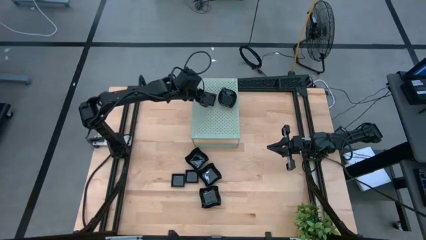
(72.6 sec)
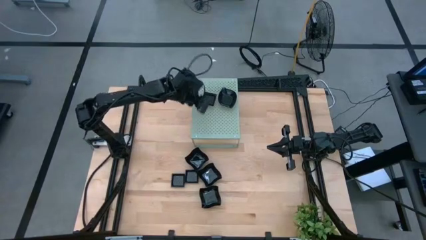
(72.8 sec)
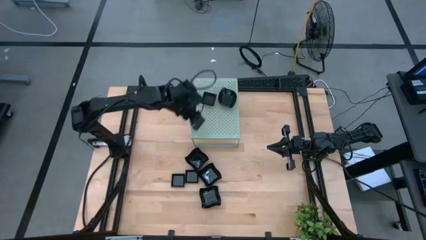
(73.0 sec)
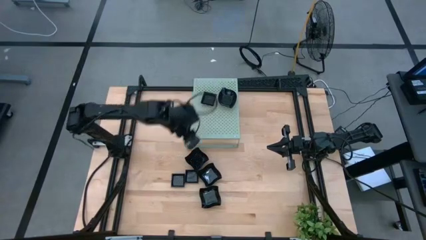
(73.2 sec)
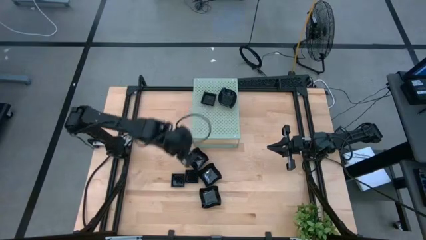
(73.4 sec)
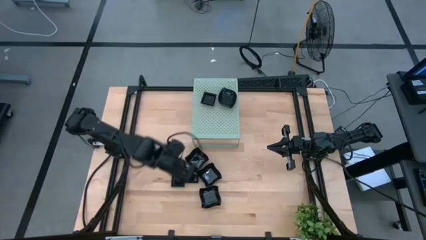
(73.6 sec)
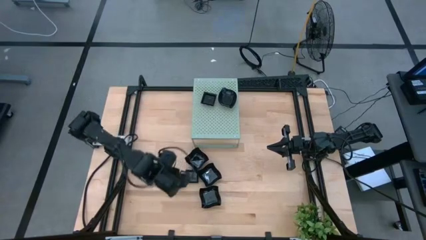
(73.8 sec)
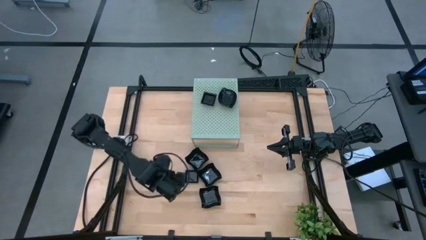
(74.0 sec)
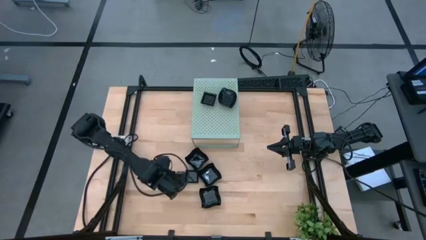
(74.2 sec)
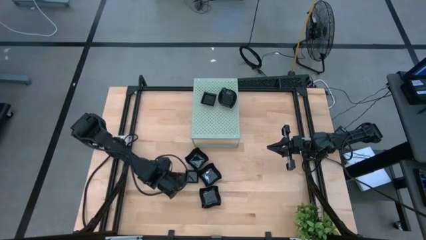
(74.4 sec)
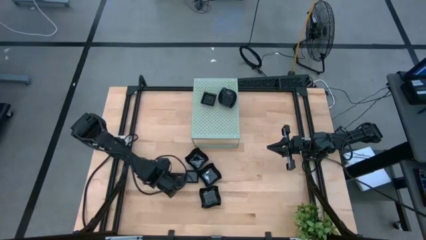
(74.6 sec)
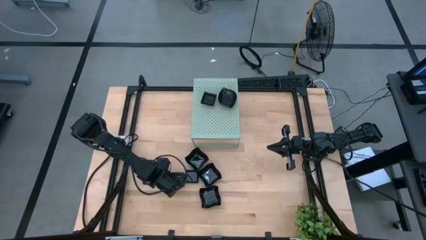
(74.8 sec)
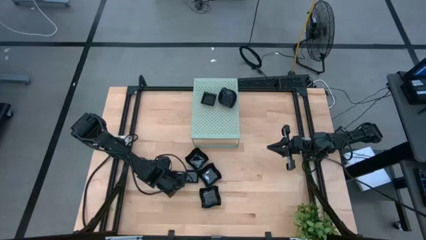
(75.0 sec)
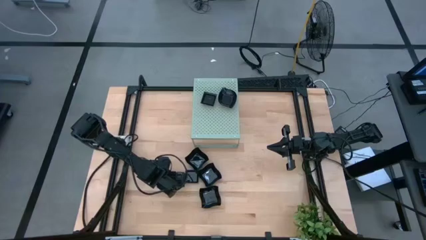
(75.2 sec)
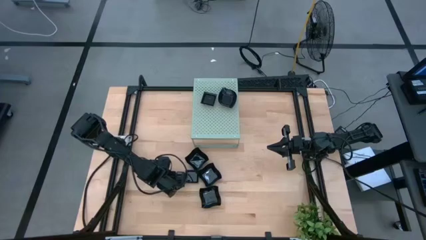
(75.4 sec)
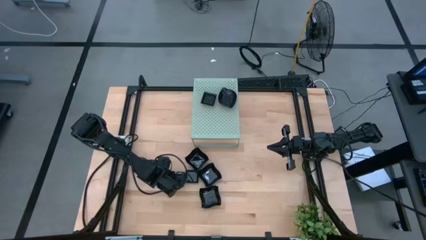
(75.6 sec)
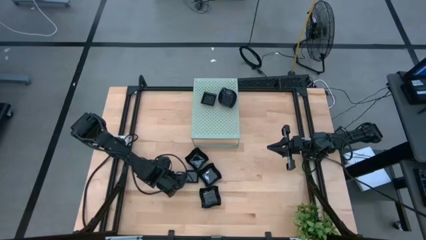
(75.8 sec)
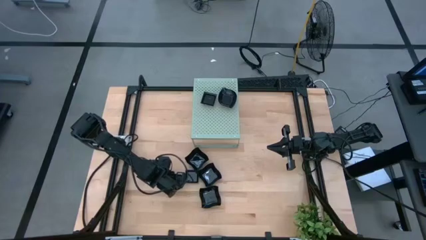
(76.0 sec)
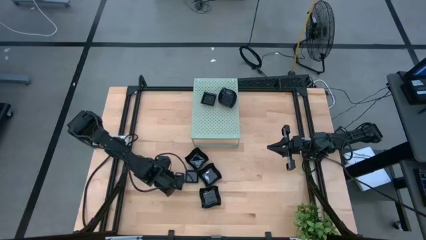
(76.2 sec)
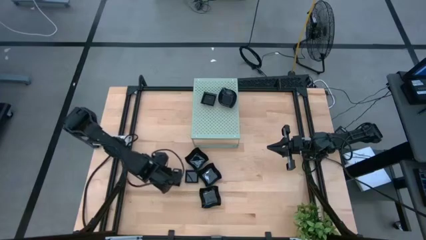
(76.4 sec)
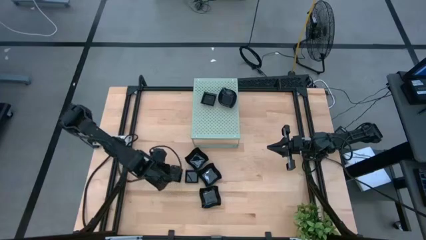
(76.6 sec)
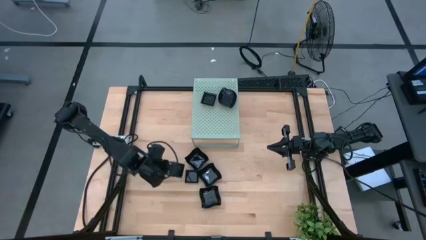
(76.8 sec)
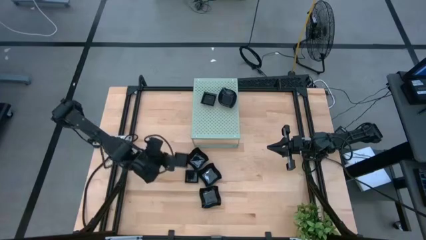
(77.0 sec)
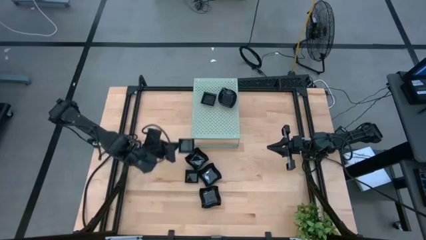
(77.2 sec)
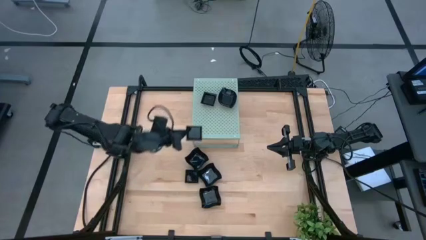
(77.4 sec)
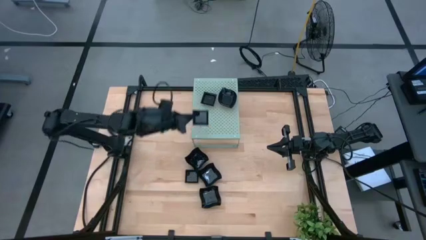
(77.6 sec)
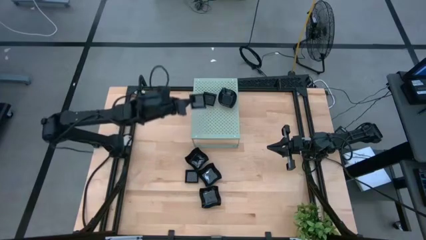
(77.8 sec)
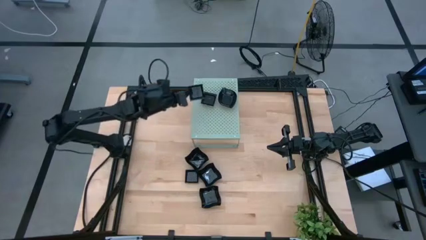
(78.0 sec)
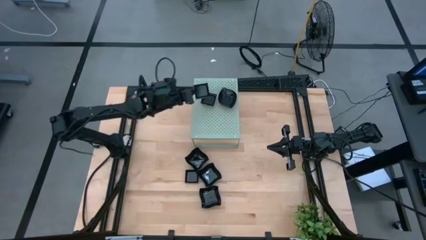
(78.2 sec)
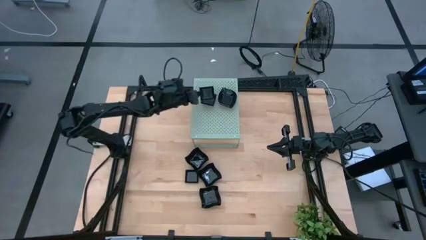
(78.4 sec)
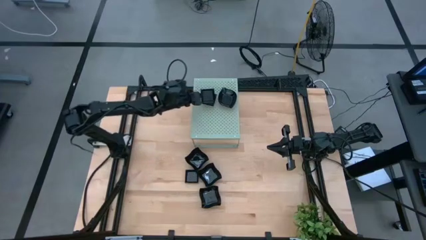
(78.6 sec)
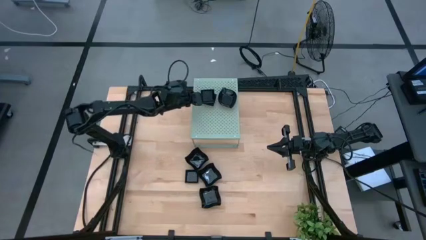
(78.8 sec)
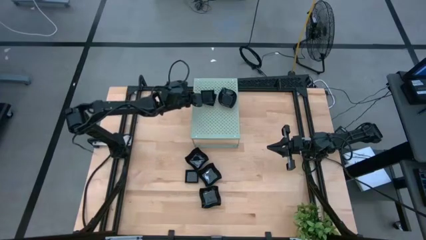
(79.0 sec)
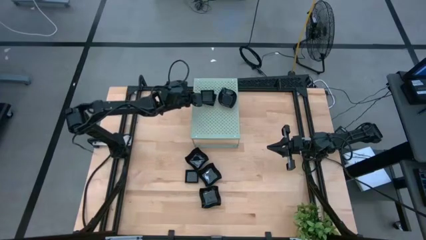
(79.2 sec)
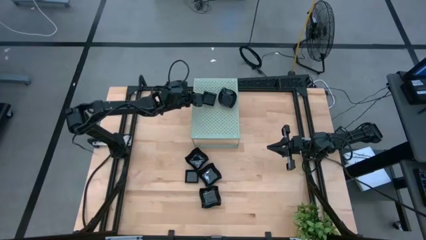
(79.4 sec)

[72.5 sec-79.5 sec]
Task: Pick & Place Mini shaped plates
Stack the black square plate on top of the other square plates on the shelf

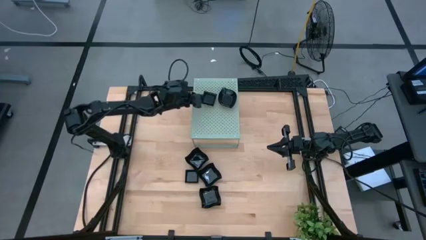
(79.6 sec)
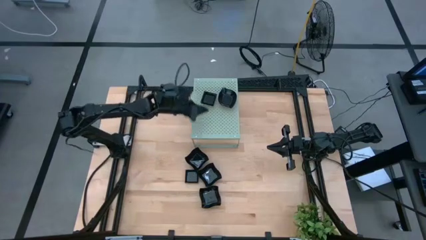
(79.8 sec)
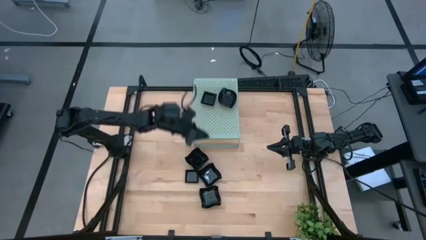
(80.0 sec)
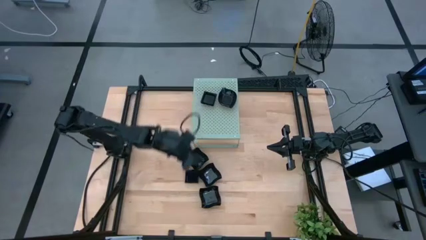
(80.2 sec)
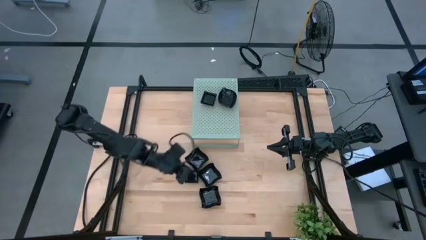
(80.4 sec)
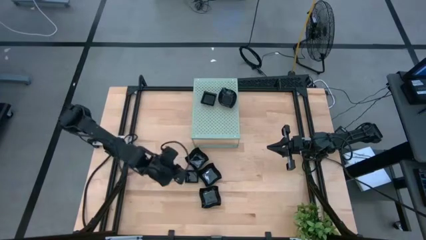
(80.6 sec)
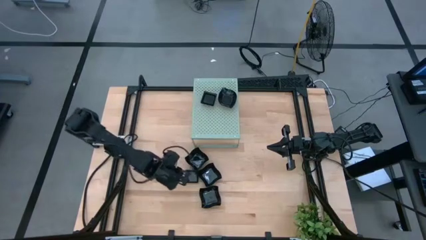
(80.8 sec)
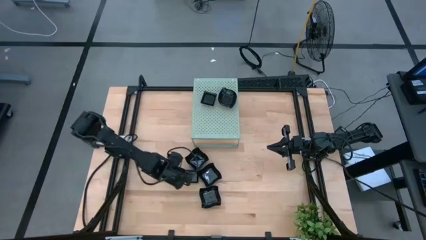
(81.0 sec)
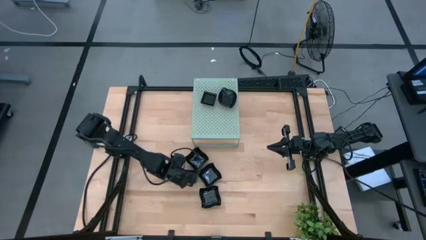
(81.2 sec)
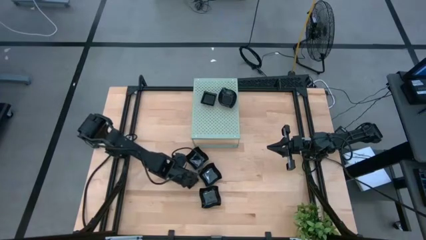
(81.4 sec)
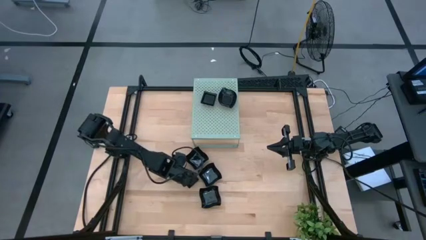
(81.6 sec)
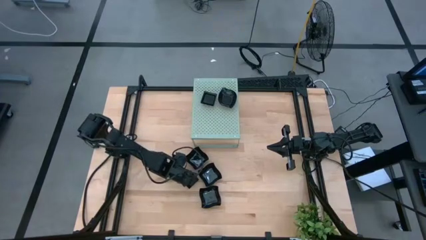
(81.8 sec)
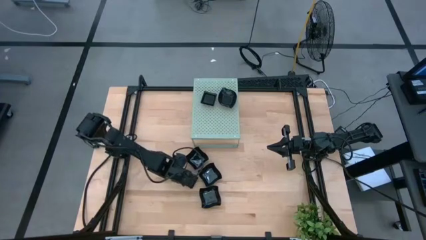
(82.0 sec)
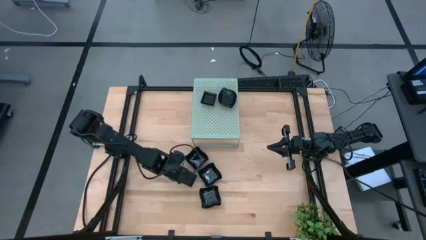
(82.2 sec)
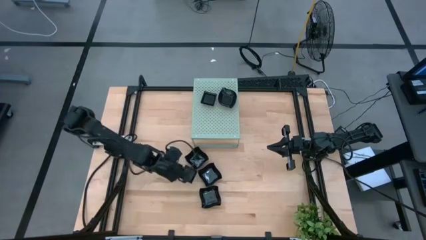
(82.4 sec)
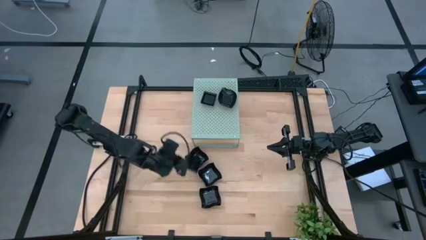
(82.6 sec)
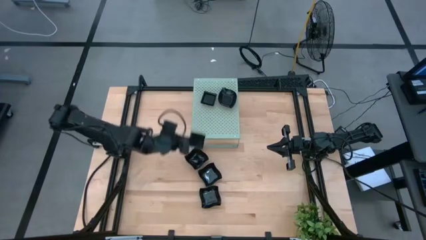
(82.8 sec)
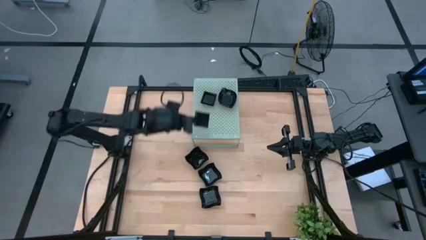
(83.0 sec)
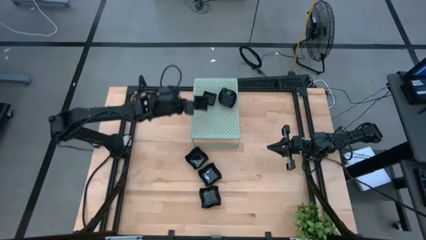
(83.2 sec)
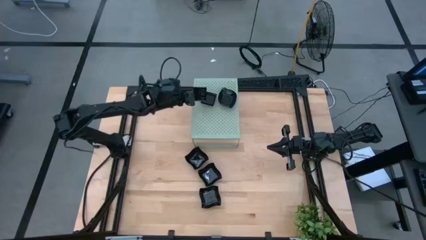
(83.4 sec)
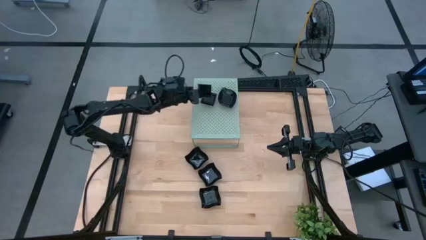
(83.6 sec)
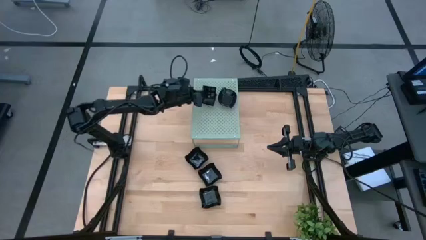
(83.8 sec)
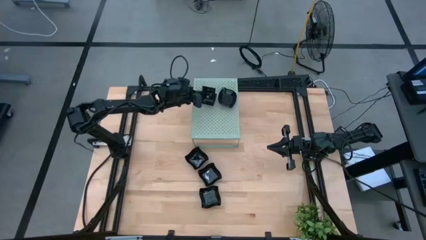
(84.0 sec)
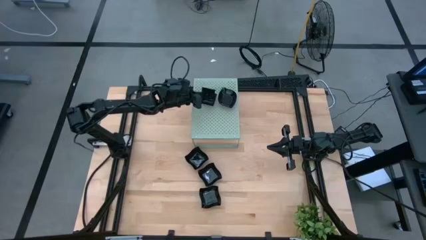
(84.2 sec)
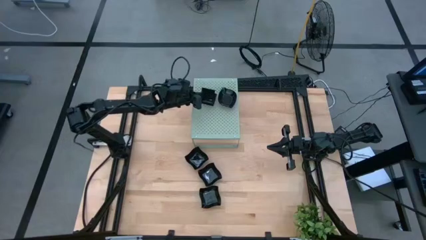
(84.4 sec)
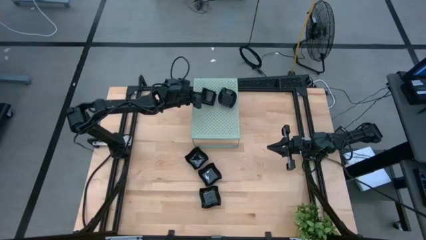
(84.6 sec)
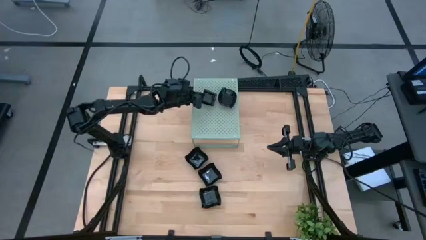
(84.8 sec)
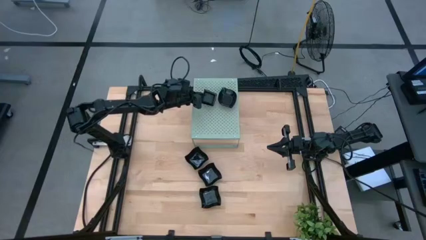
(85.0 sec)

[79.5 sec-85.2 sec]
Stack the black square plate on top of the other square plates on the shelf

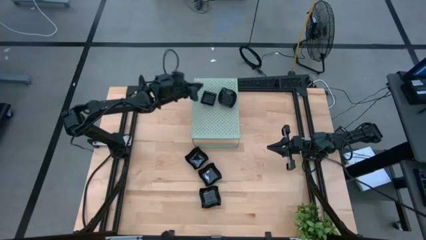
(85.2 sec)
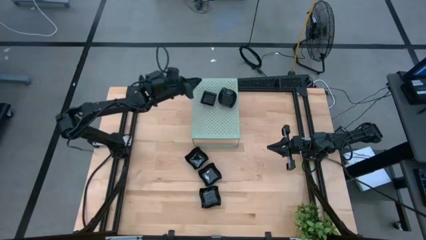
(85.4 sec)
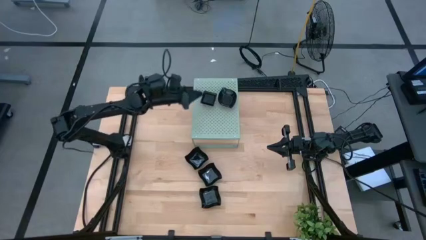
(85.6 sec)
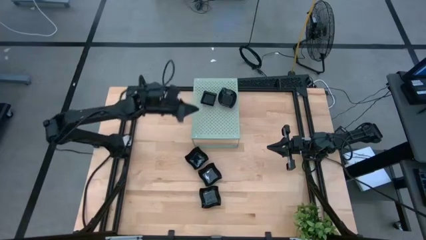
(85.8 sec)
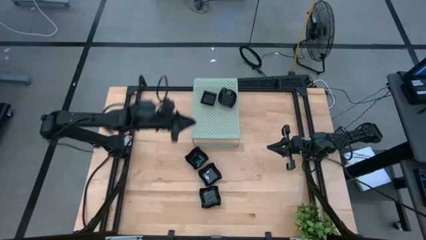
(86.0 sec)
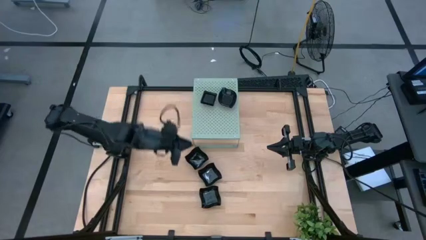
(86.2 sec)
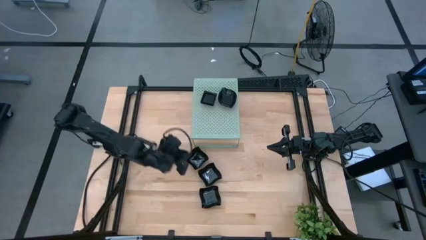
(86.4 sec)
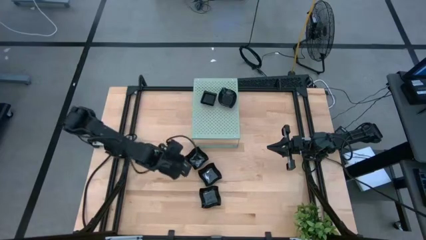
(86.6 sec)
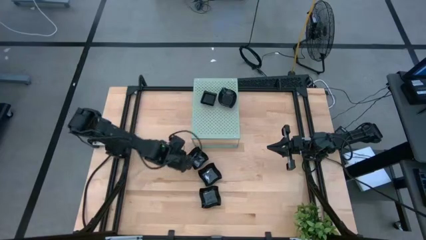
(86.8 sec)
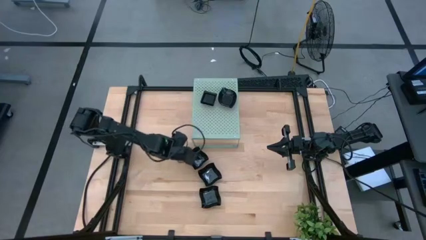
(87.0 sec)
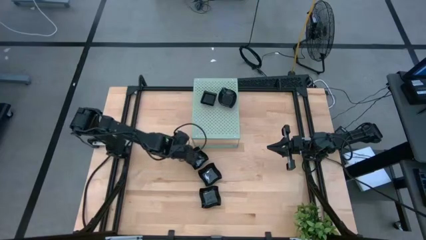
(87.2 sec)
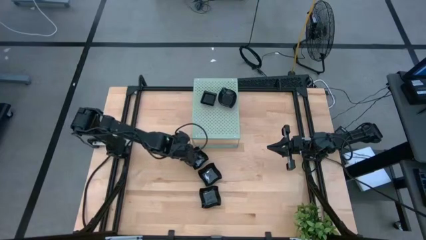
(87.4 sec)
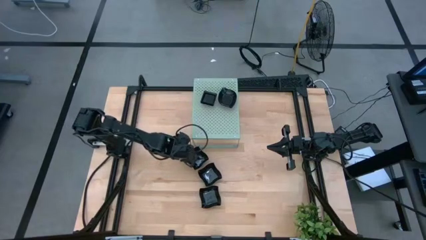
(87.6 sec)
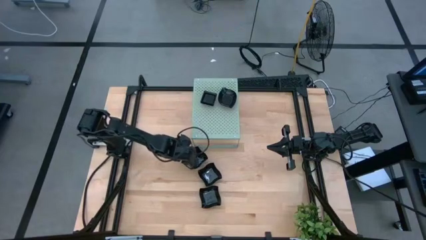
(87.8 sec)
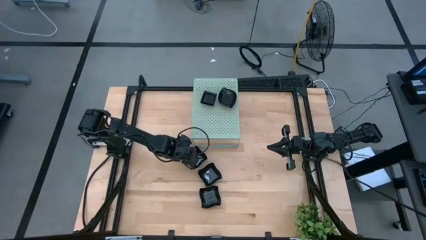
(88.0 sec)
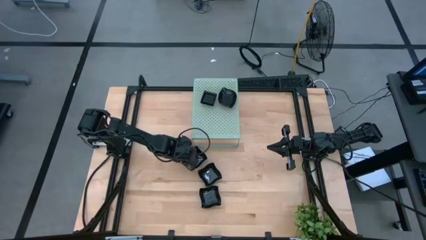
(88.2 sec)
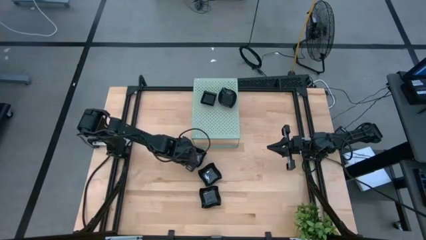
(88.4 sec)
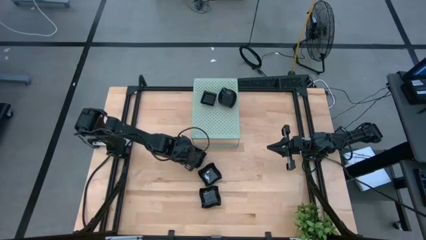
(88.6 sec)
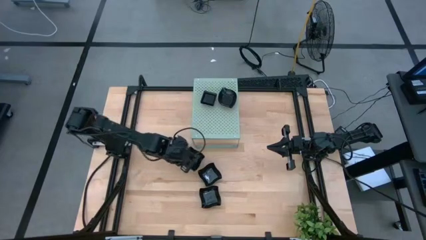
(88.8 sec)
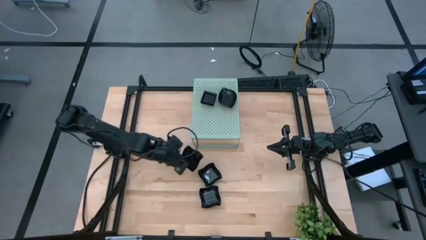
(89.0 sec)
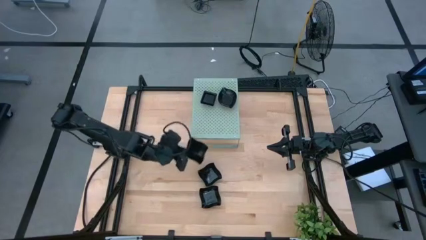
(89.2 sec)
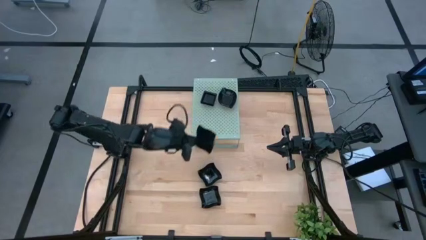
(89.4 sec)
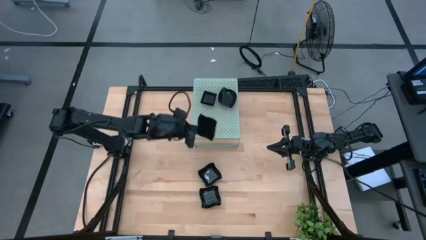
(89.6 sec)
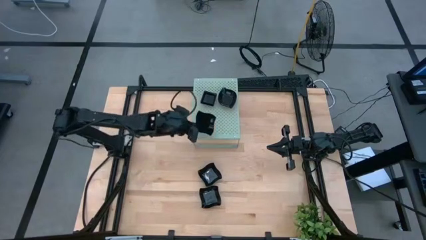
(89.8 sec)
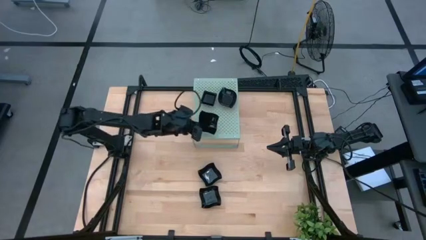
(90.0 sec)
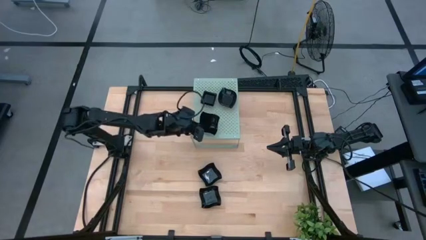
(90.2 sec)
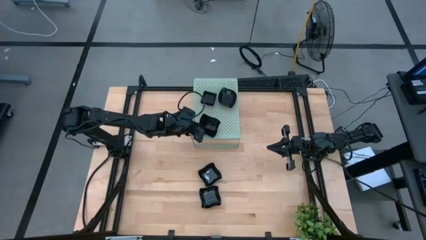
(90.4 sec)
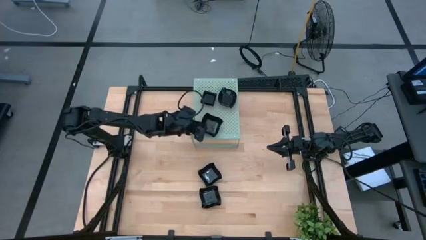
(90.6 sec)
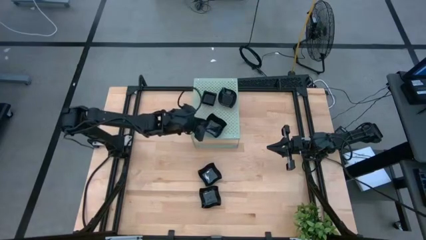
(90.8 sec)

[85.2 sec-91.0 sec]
Put the black distorted square plate on the shelf
